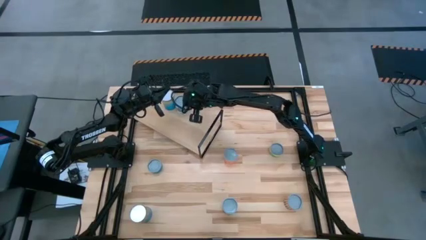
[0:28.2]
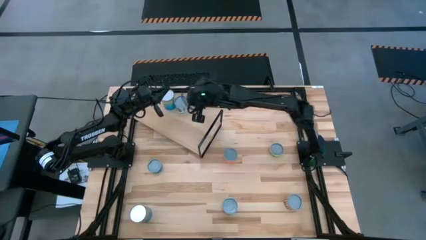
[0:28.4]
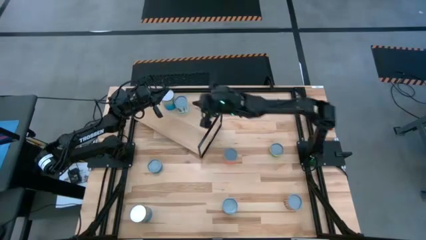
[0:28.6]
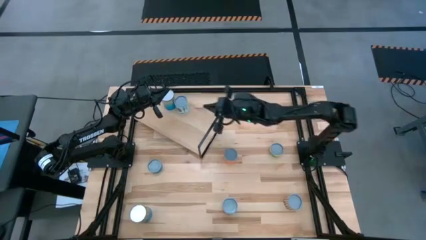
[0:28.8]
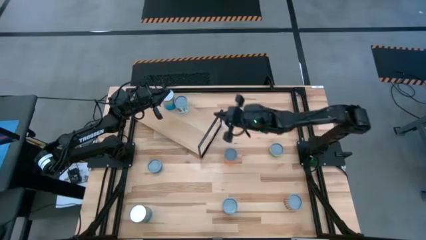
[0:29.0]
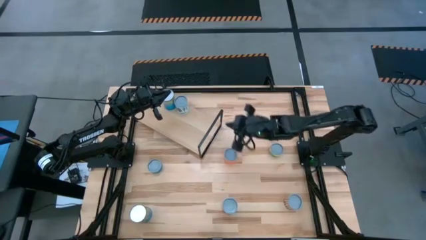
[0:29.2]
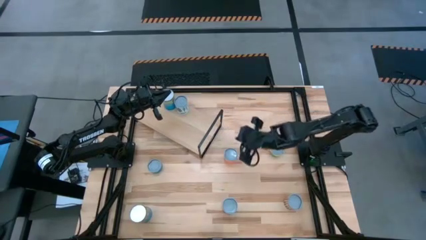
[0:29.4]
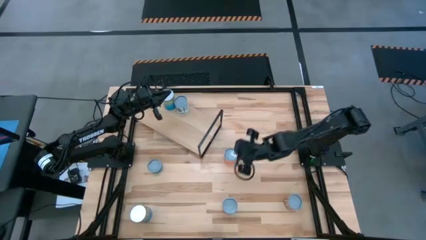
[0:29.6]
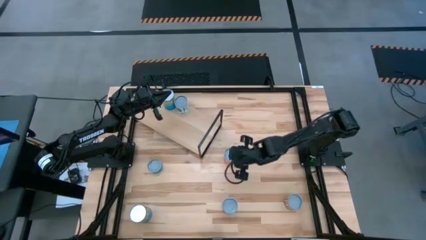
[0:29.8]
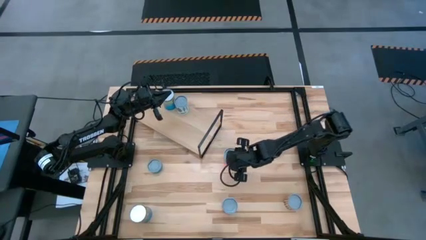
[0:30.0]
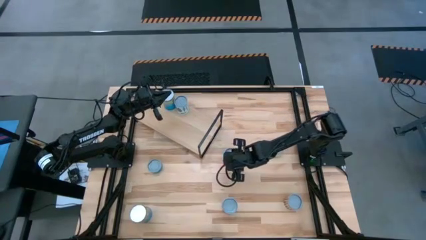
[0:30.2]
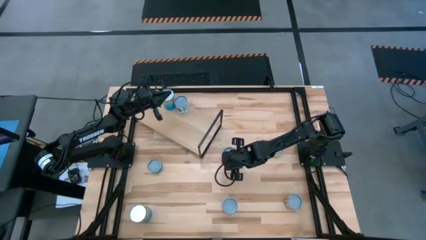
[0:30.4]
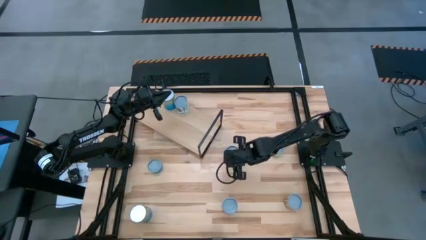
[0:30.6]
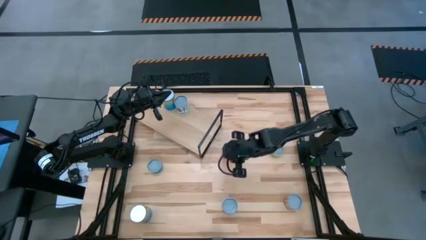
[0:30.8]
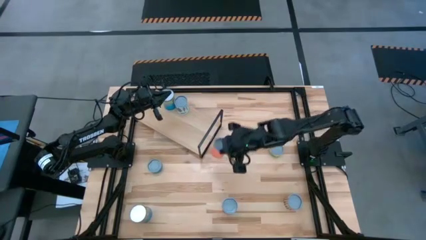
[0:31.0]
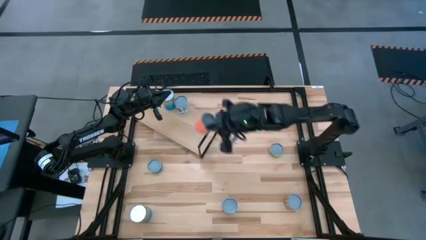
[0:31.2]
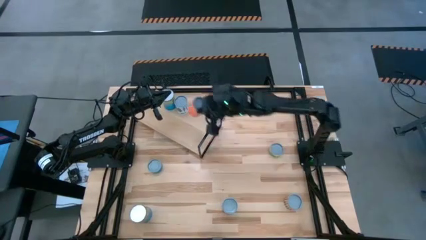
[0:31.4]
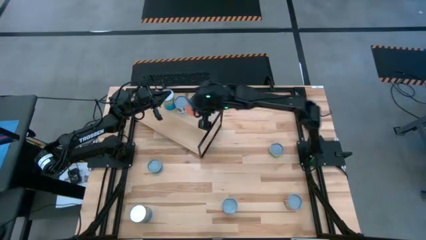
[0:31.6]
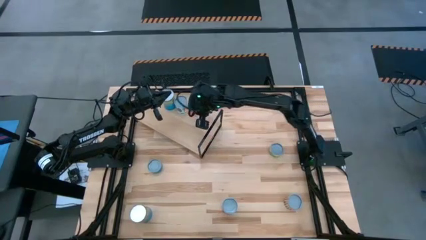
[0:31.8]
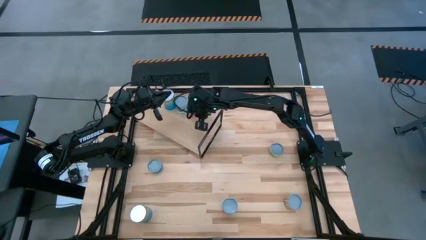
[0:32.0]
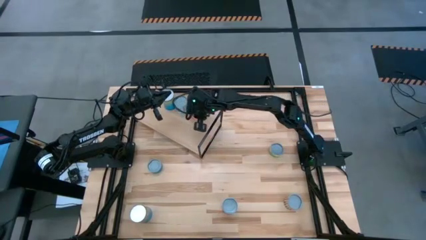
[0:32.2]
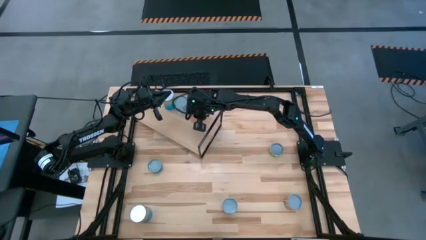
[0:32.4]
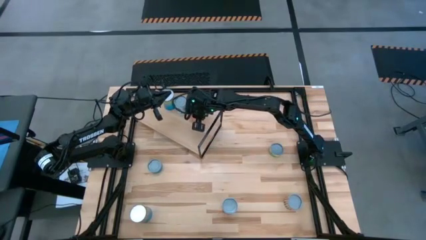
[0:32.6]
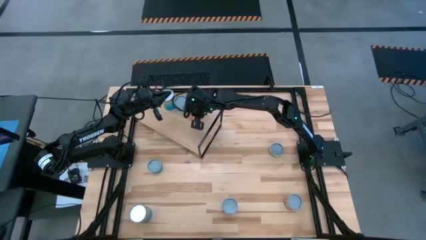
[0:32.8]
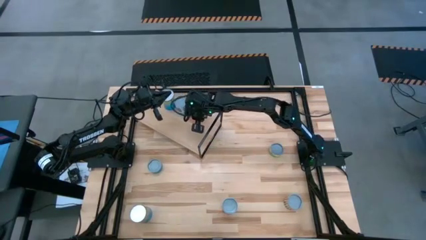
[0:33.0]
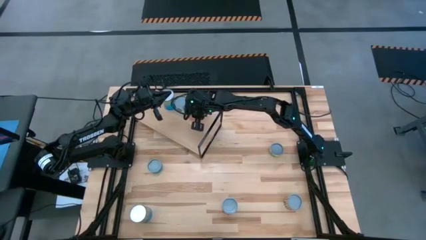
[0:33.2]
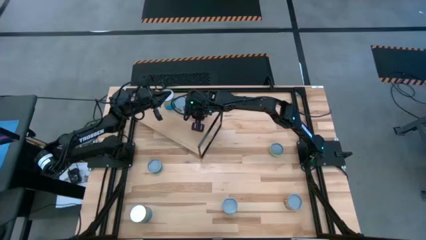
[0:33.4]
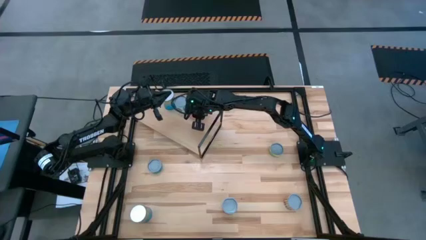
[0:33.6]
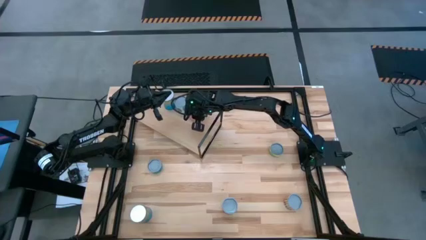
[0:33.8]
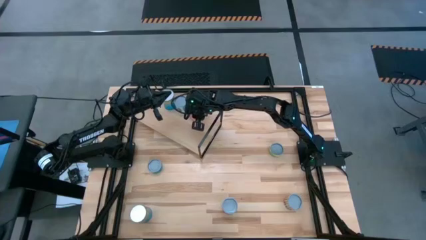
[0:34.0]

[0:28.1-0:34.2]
Task: Pick and place cans onto a shelf
Put the canned oranges on the shelf

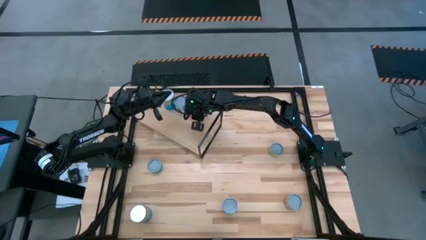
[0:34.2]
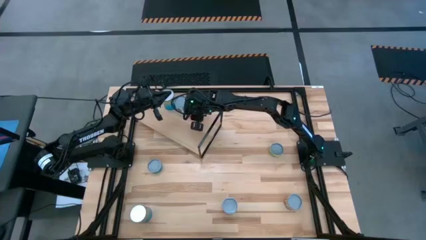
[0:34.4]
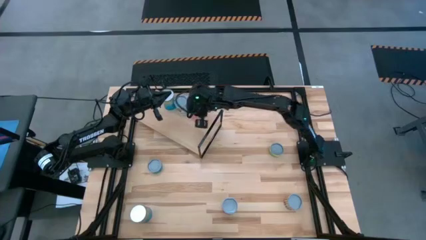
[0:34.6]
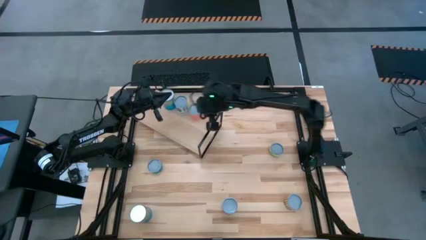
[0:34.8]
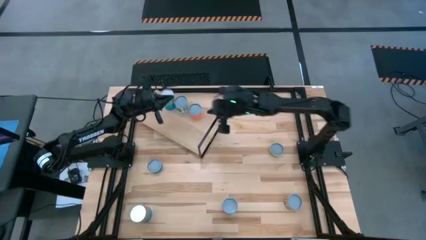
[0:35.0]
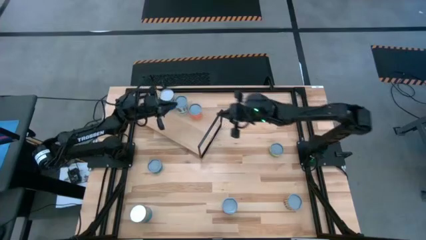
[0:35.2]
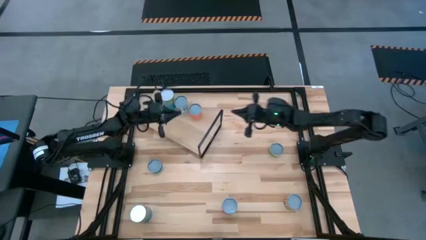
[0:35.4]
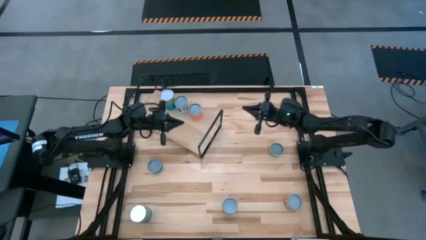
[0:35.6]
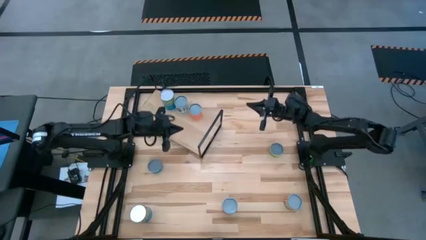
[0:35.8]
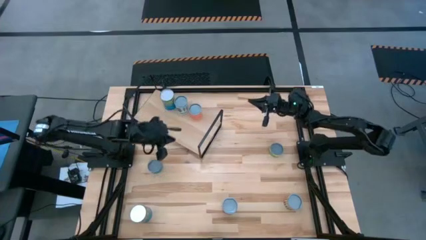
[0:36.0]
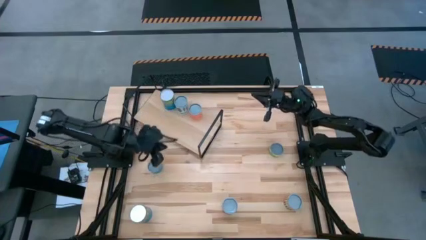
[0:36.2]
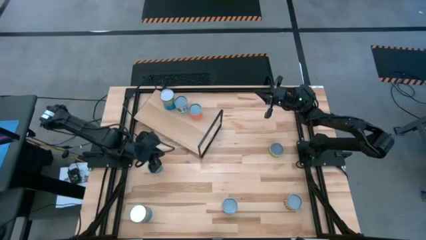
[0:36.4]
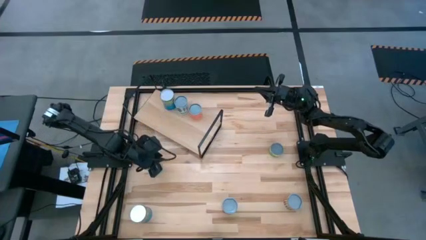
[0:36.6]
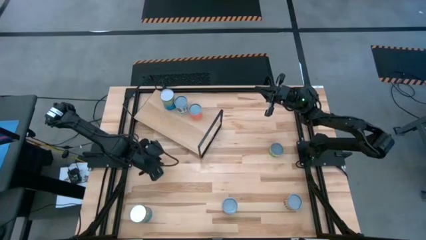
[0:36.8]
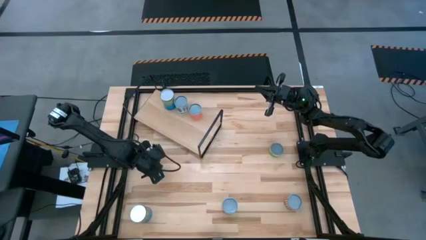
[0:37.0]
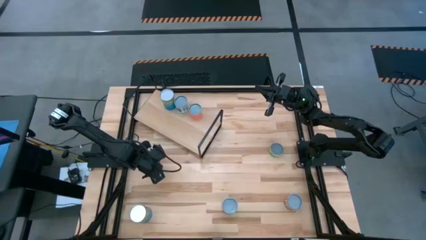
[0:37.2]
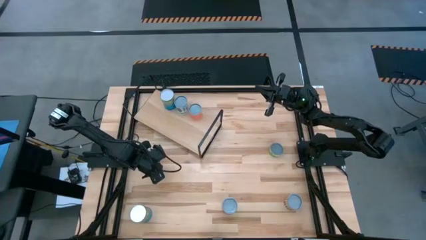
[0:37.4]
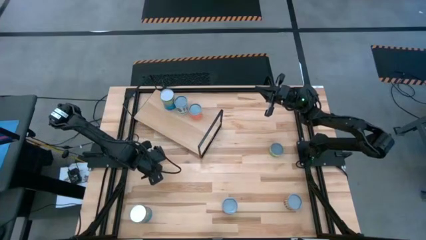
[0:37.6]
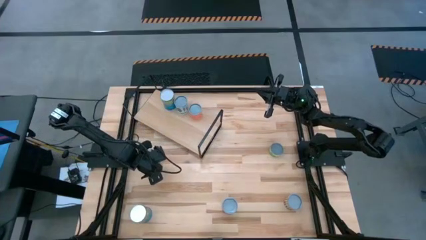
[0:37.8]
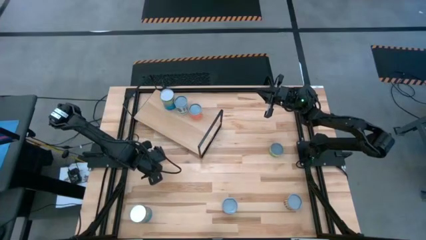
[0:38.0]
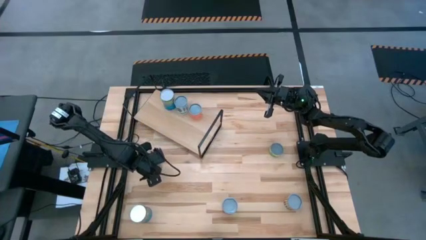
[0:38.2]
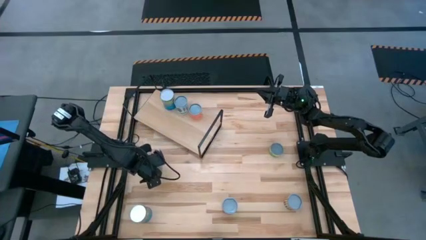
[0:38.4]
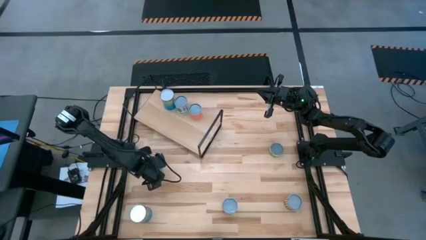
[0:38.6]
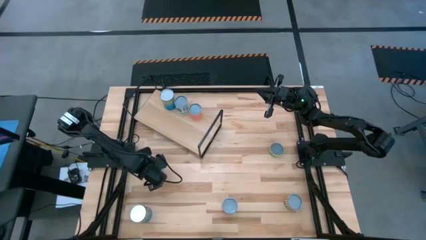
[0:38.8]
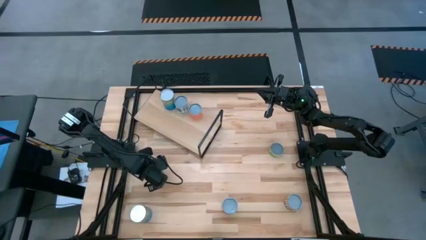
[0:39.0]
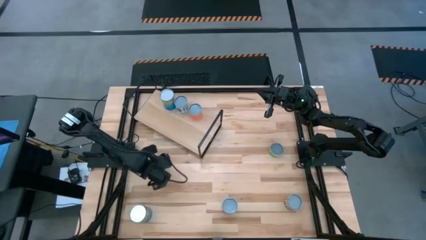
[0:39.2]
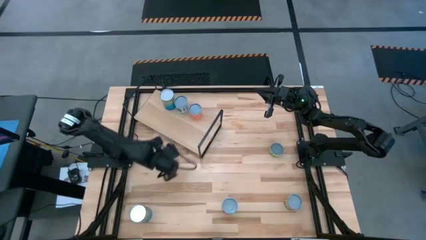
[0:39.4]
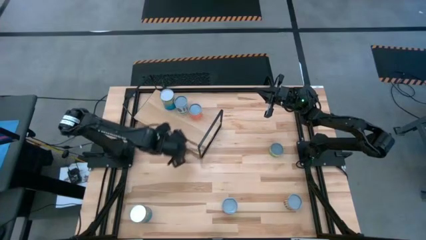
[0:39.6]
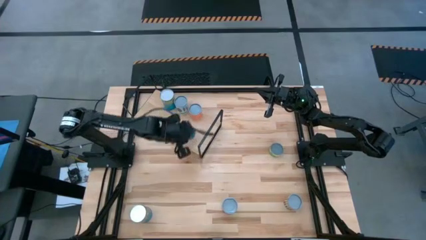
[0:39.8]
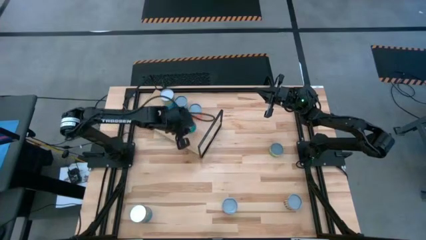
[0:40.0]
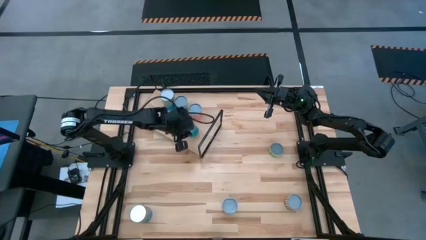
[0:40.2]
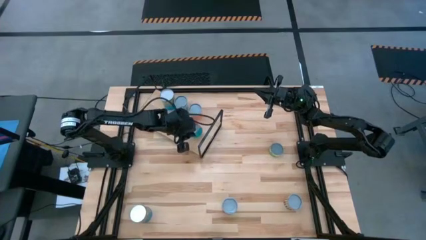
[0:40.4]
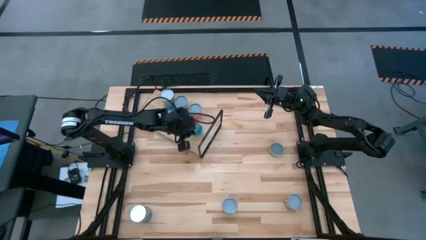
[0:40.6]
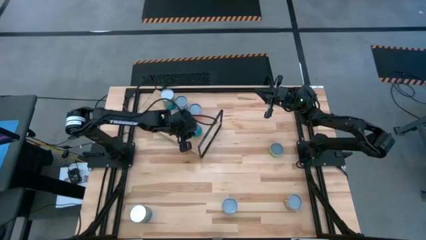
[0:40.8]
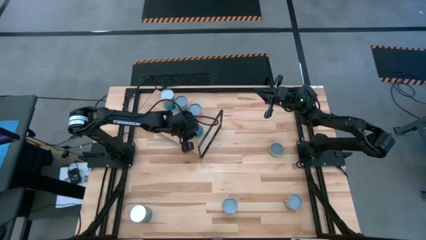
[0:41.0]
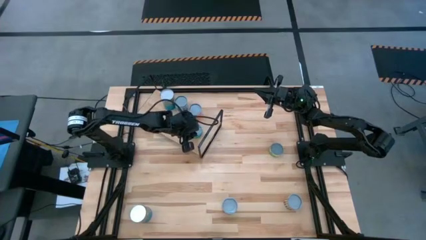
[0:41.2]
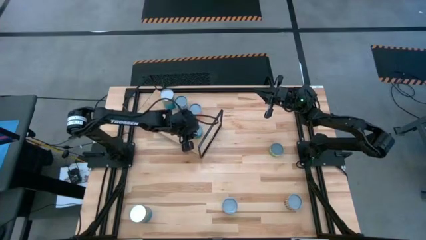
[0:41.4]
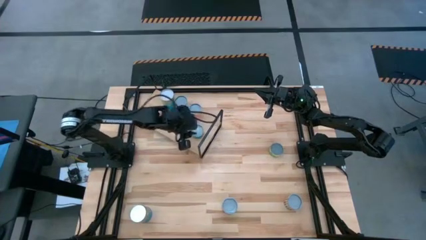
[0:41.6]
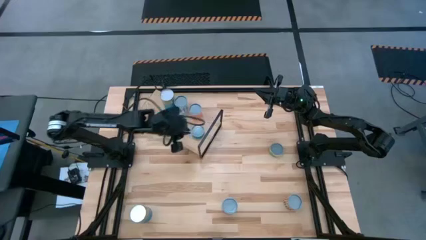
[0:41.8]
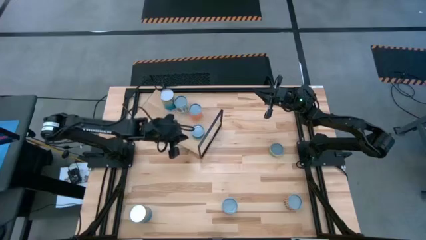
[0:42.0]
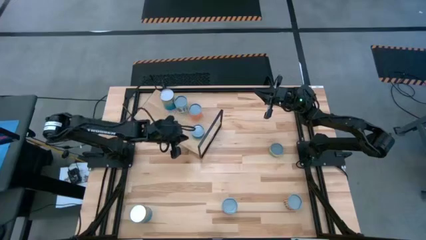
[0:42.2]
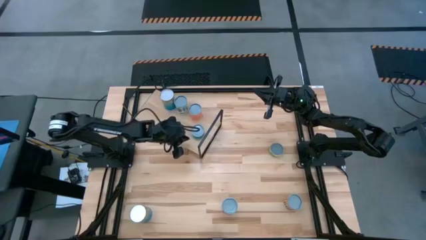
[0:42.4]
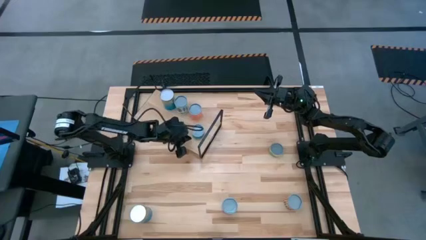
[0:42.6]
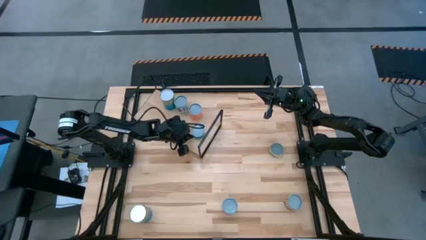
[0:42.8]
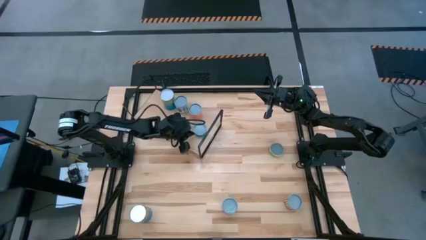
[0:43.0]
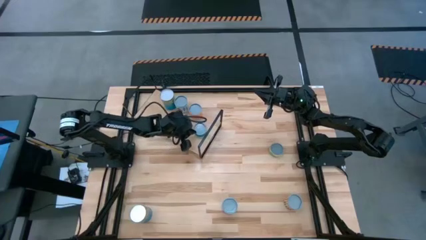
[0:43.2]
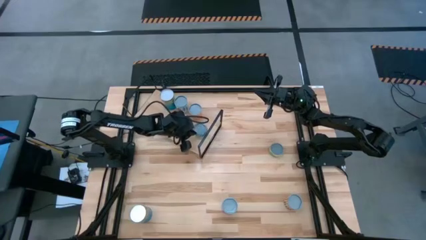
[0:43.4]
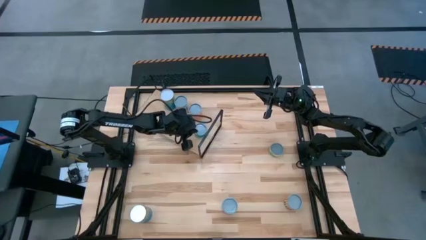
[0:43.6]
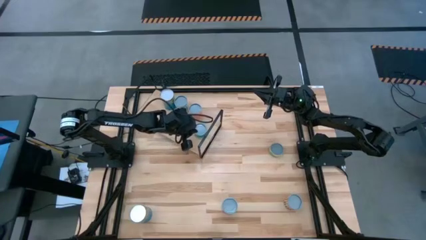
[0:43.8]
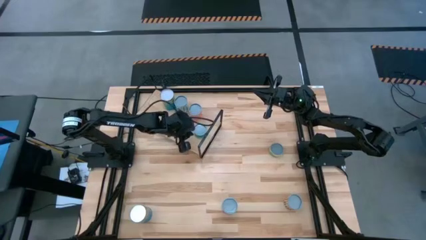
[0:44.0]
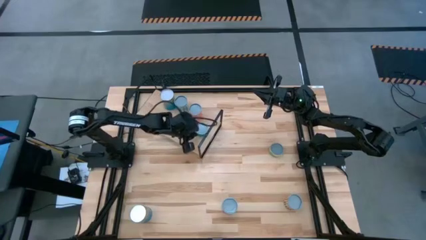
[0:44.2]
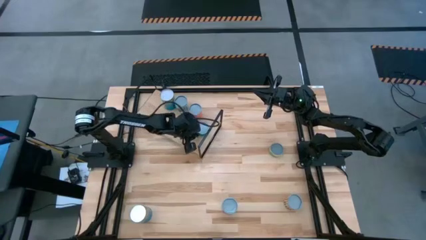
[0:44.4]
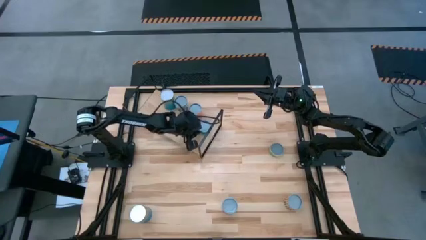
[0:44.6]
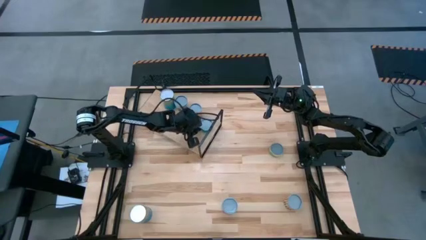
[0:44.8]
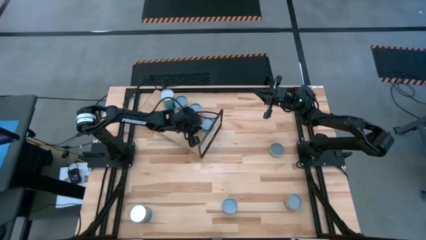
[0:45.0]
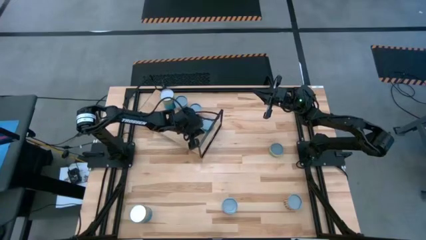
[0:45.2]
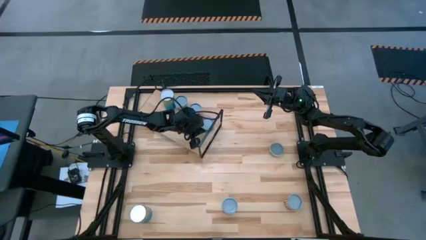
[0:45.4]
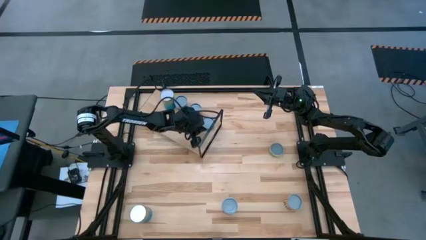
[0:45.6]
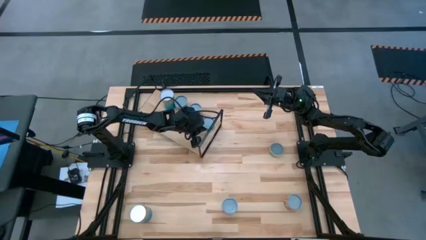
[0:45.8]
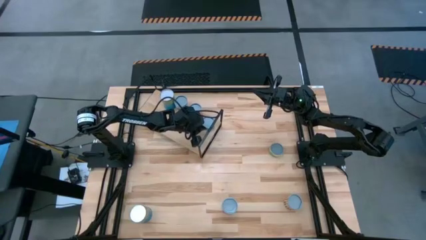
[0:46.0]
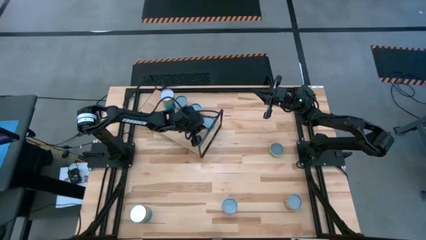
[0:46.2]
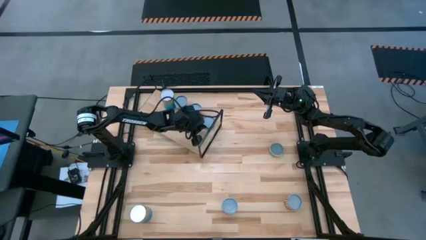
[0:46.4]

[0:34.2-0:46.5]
Put the small canned pickles on the shelf
